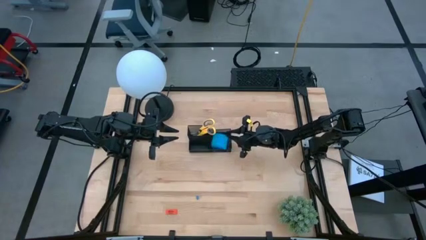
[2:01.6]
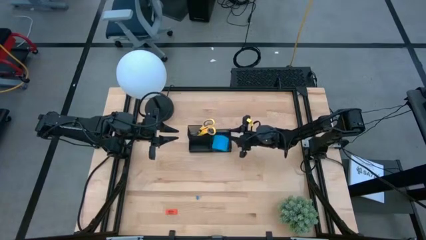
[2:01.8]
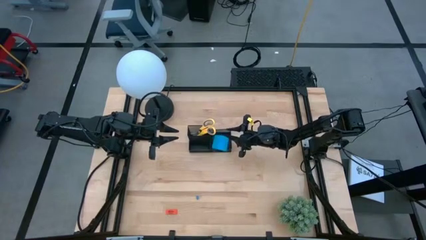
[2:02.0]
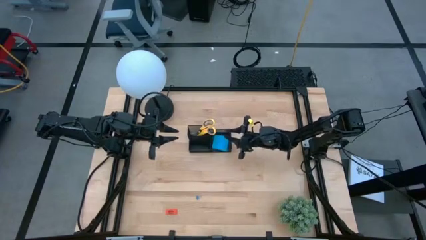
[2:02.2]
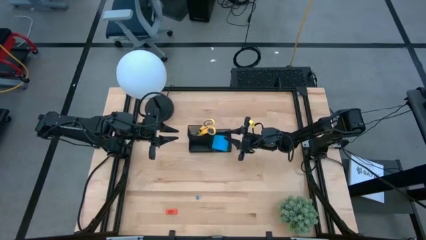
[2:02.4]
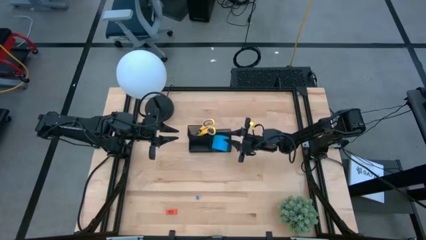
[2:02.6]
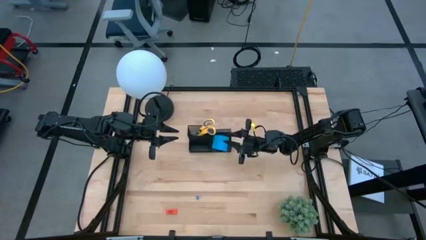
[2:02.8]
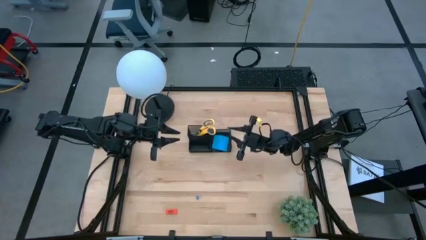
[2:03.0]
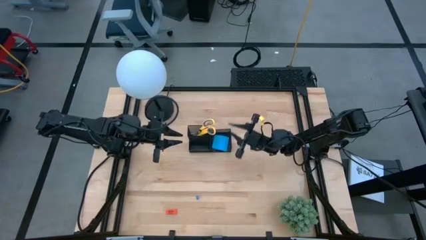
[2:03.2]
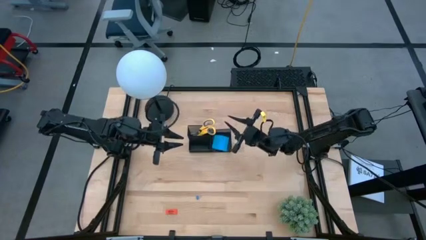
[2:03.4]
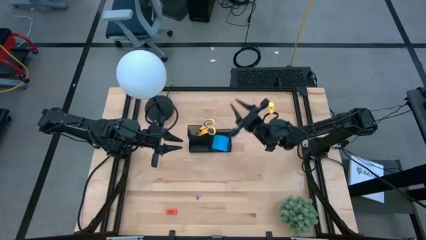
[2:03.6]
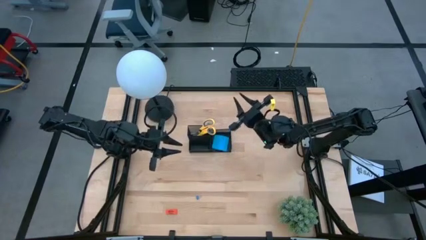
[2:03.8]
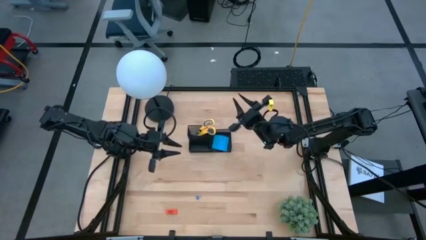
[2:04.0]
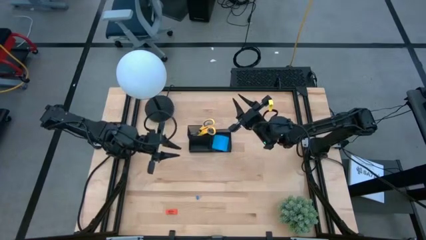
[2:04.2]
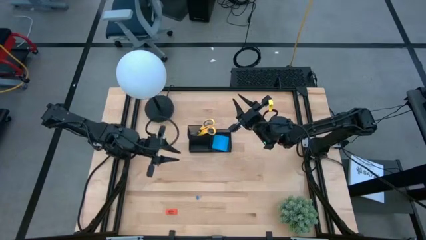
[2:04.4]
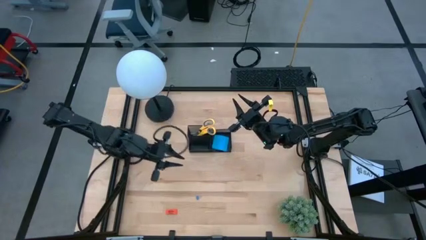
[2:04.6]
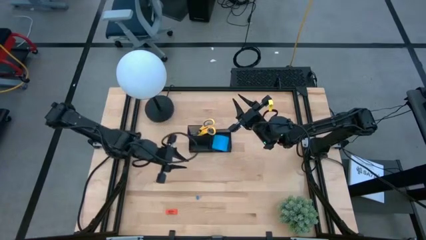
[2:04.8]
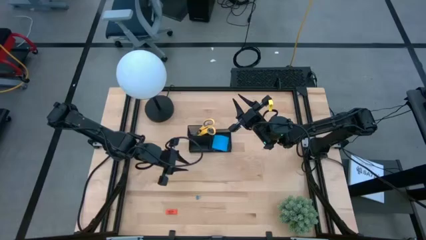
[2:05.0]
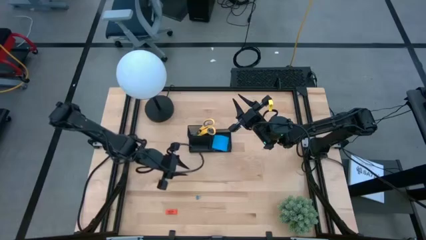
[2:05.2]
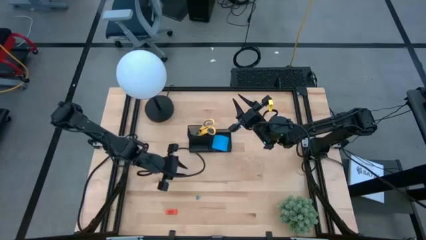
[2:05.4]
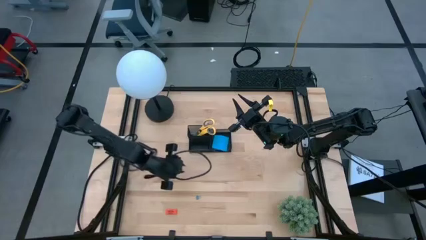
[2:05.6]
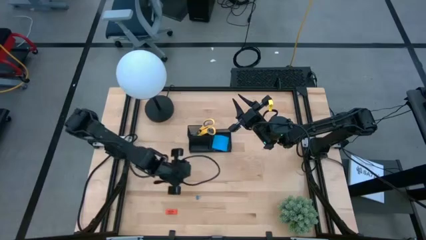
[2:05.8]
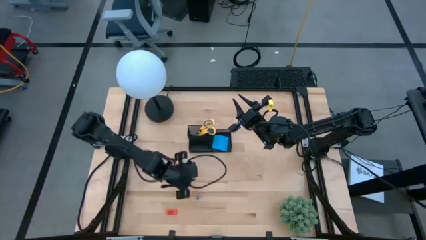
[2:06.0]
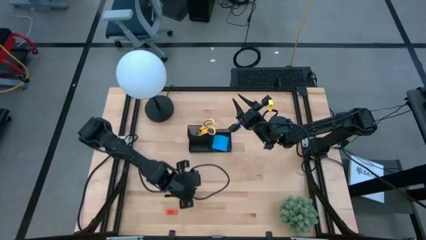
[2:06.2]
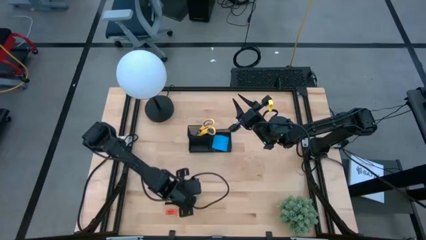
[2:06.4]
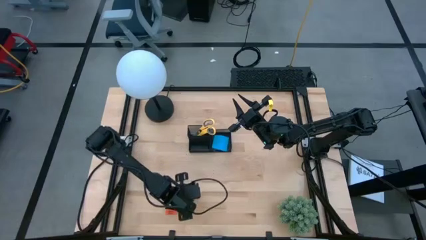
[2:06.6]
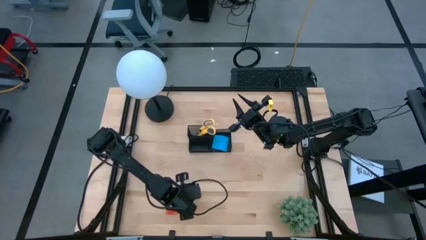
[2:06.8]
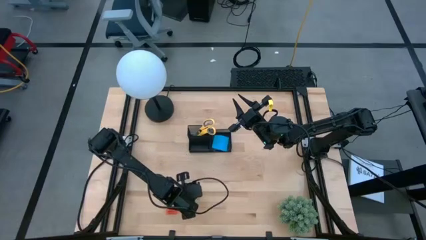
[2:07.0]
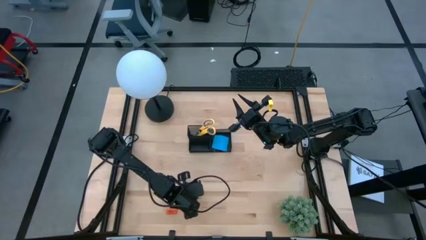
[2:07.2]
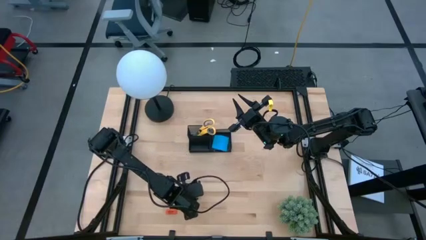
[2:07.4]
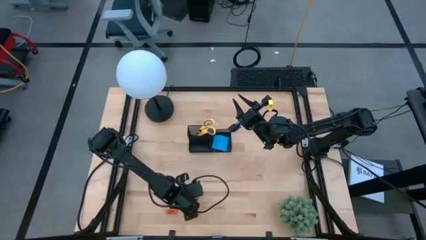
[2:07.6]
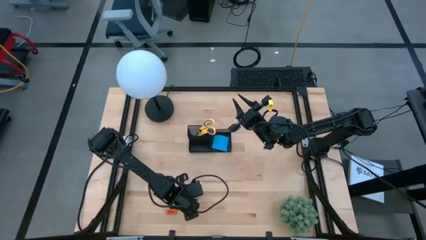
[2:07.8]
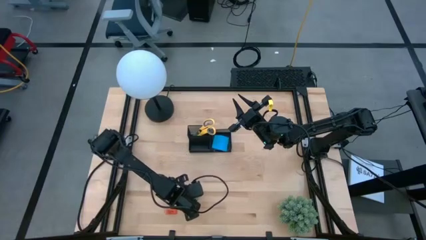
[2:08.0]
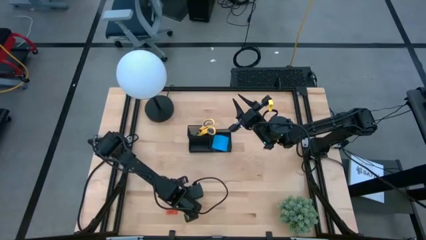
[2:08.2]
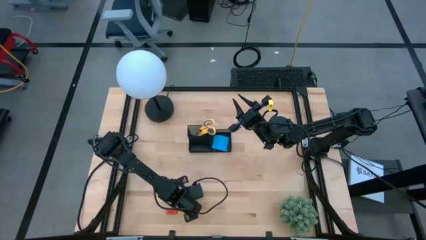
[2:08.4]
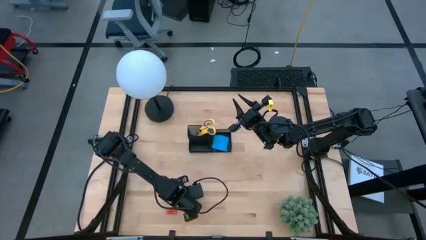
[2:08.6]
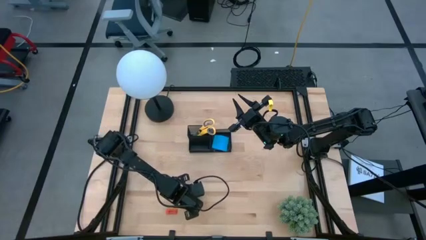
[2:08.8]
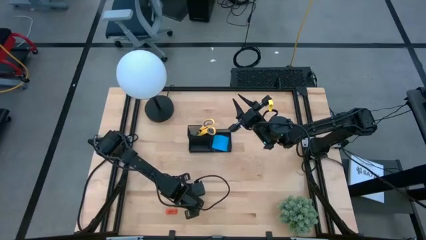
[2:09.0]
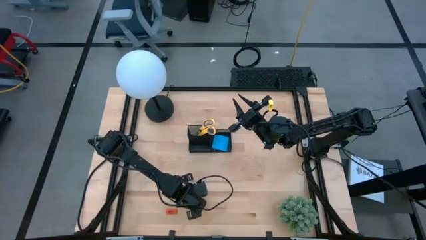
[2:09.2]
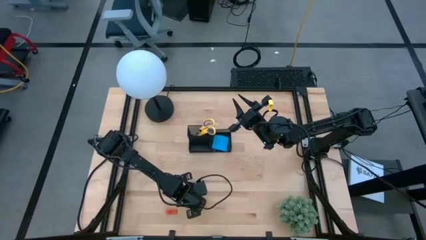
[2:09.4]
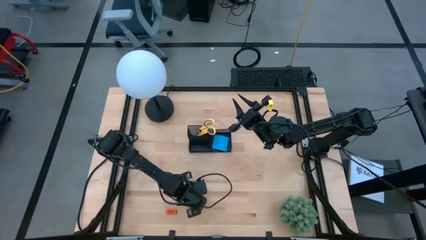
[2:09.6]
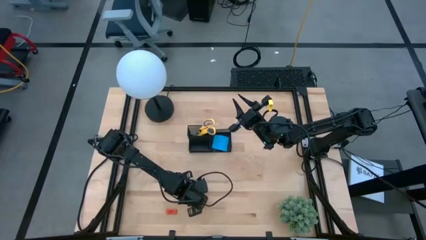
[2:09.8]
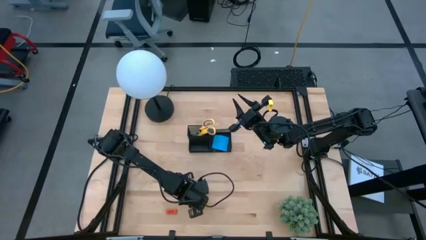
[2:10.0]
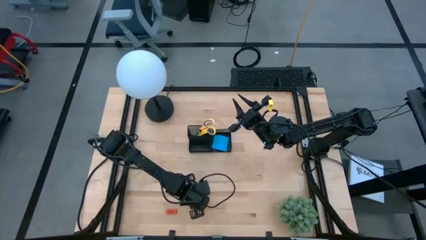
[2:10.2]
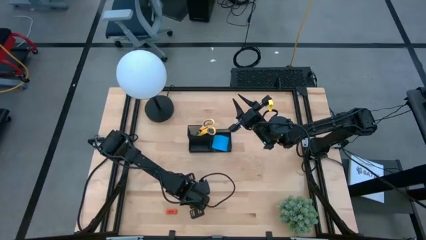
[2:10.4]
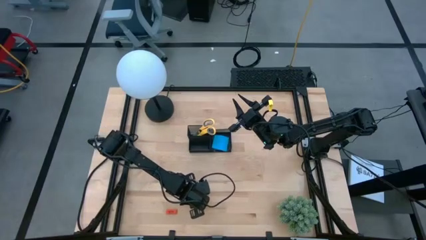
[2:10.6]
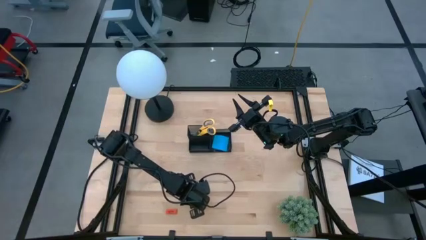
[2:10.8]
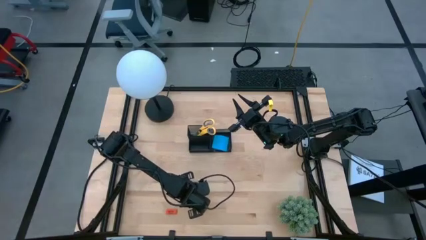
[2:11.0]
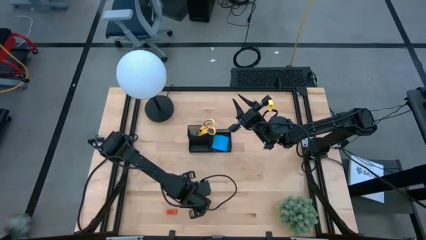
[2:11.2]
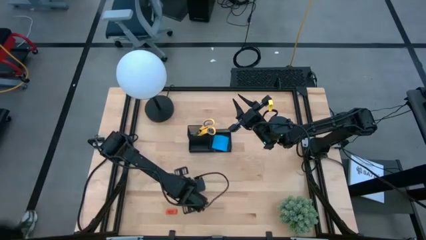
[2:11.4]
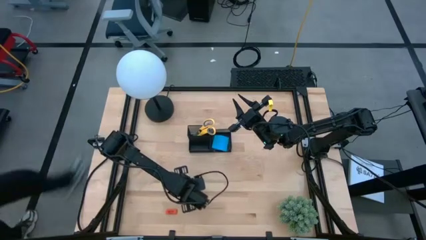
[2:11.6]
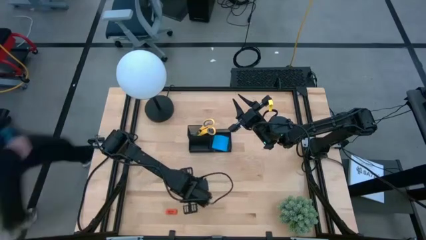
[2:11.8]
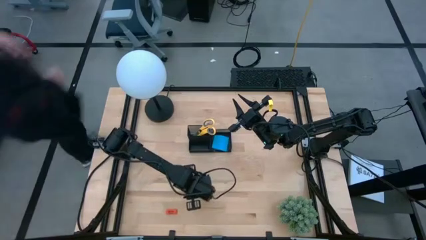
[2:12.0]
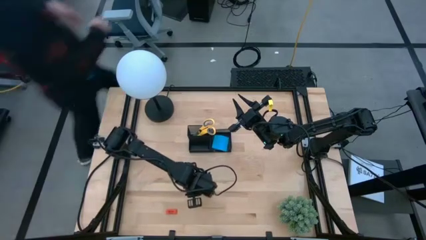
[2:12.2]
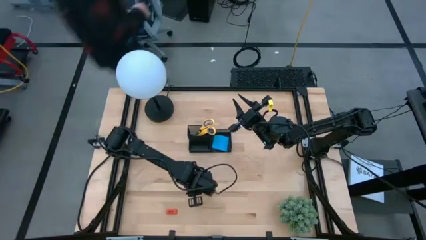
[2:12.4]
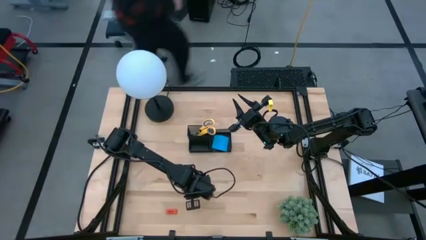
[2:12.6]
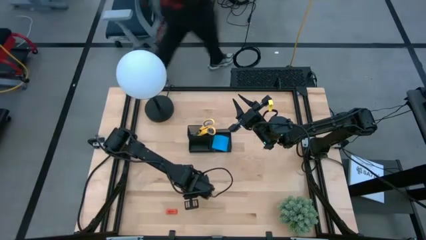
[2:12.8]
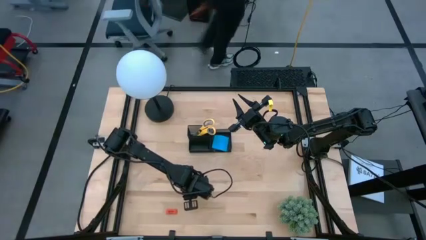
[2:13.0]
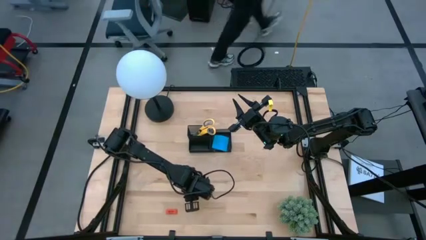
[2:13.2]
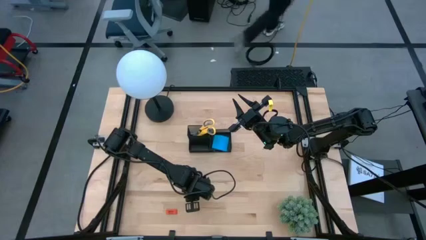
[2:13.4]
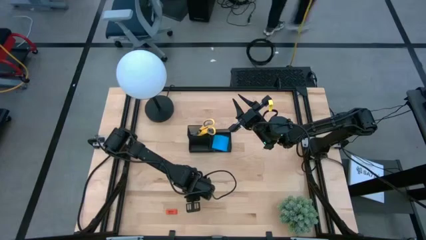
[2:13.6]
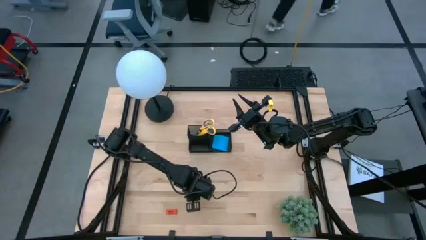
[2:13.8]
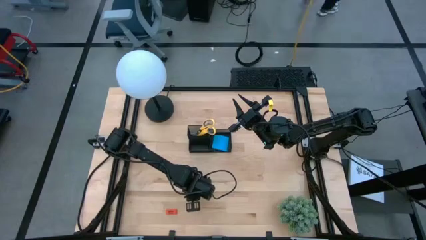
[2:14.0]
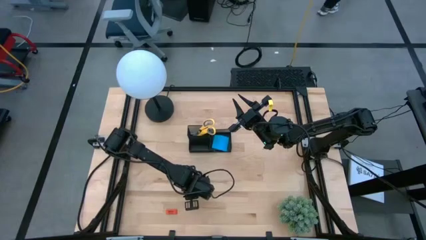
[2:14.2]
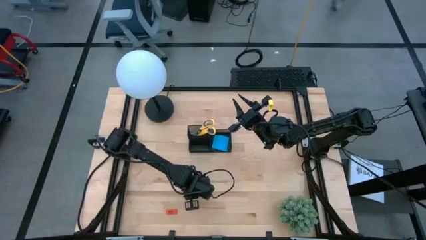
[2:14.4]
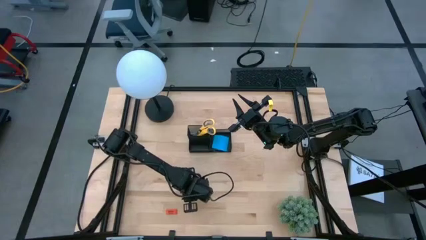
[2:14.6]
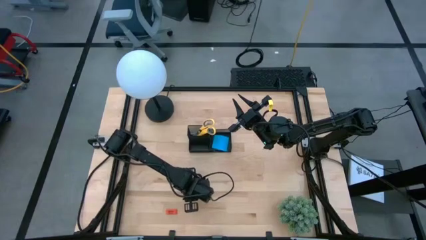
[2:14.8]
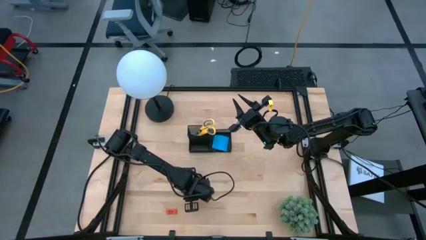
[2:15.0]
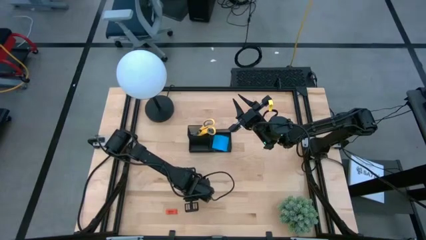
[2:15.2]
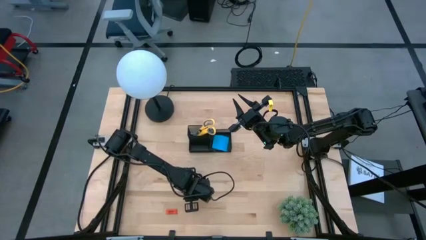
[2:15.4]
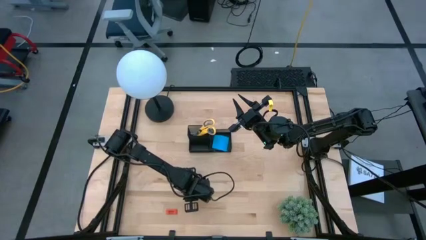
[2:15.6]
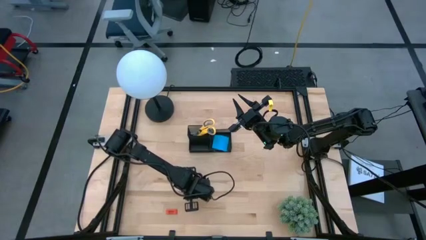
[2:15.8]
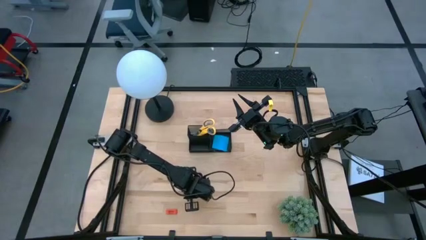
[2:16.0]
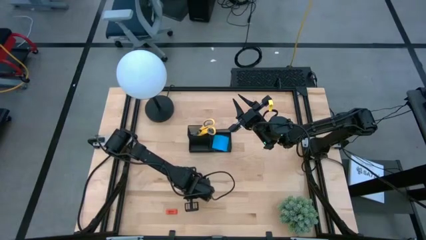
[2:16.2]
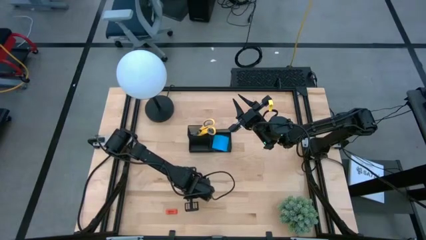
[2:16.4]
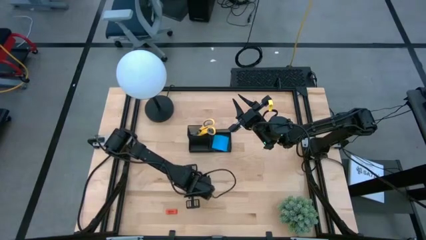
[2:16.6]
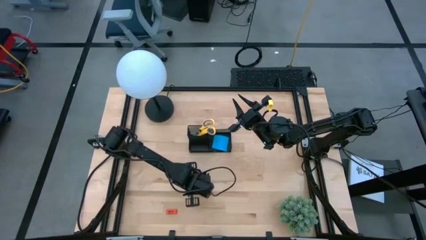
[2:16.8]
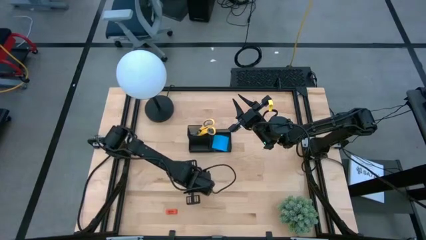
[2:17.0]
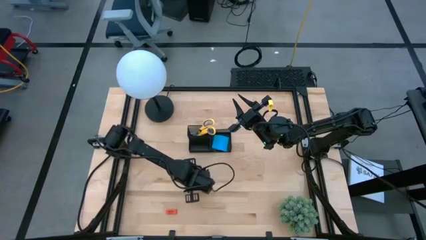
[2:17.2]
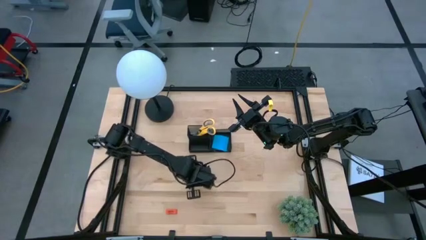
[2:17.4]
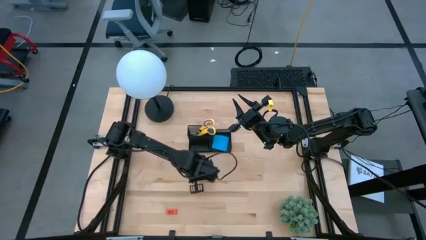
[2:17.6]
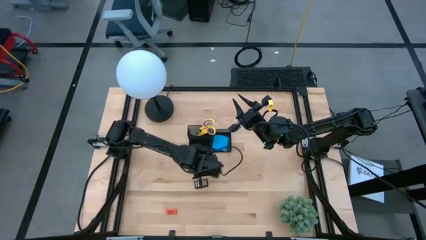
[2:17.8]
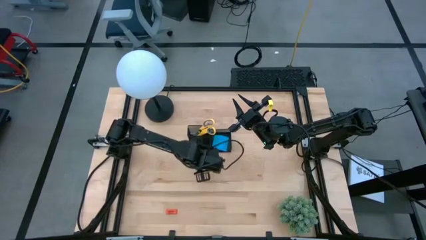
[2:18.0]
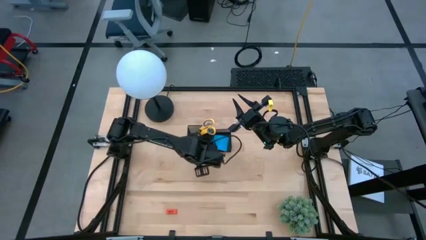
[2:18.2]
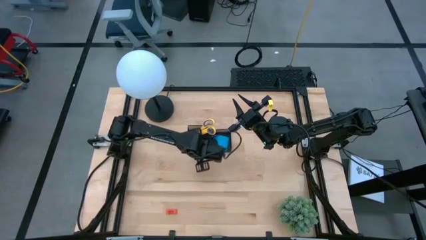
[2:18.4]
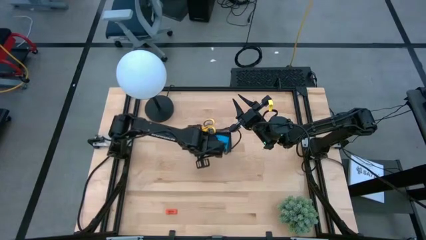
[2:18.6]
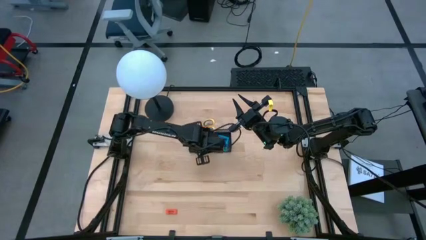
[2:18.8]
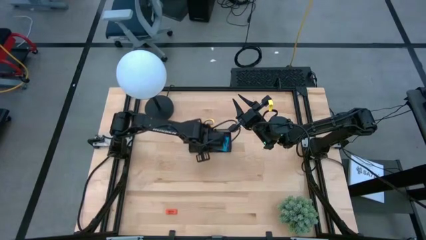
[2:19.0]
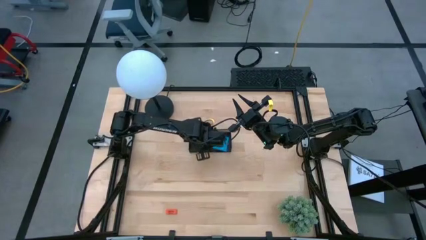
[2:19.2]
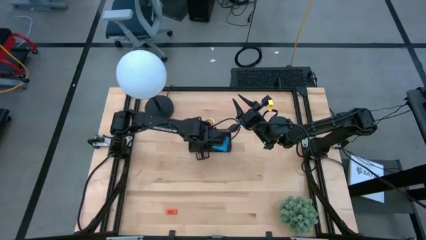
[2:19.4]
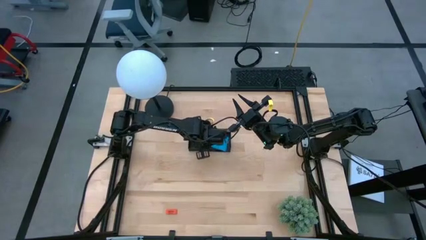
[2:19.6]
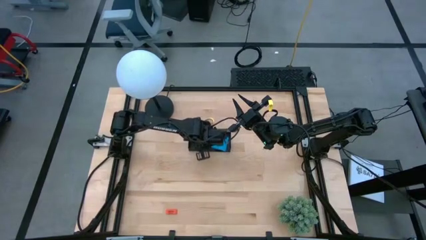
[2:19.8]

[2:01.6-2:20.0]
Task: Pick and place office supplies into organizer
Put the blue binder clip into the black mesh desk organizer
